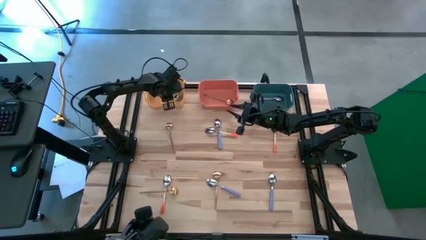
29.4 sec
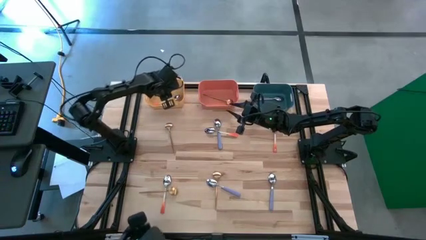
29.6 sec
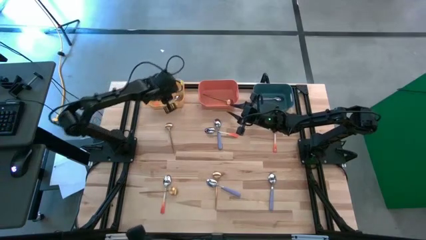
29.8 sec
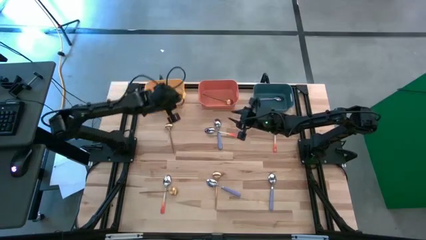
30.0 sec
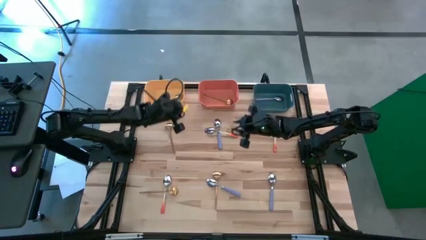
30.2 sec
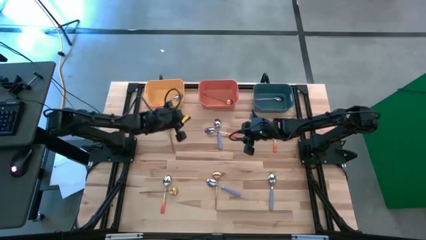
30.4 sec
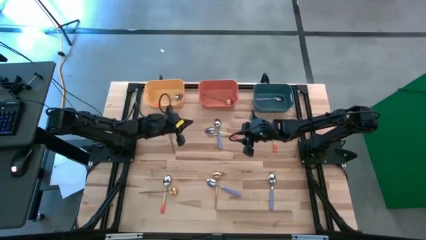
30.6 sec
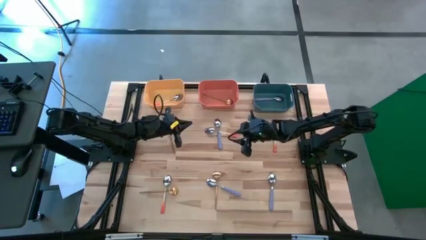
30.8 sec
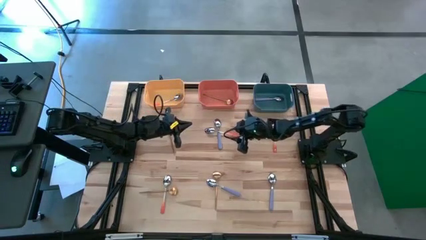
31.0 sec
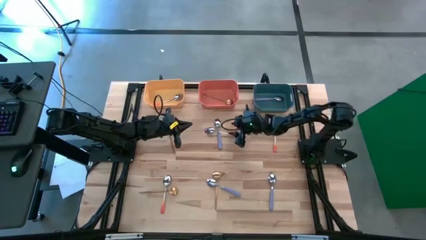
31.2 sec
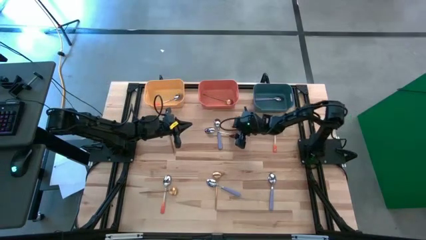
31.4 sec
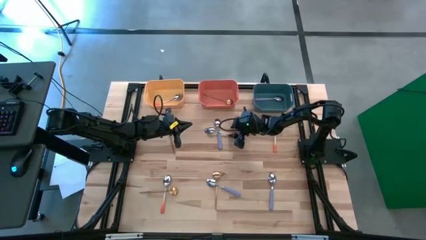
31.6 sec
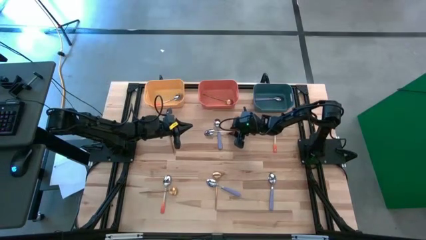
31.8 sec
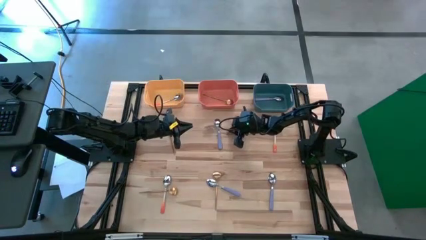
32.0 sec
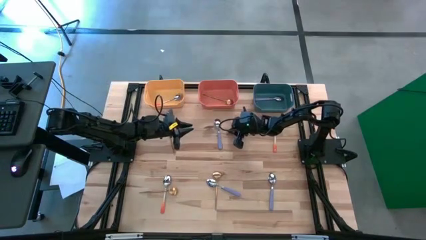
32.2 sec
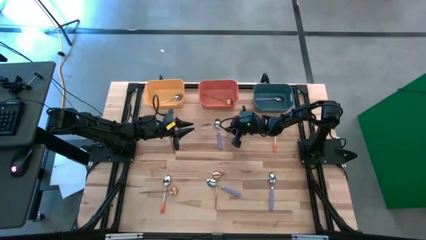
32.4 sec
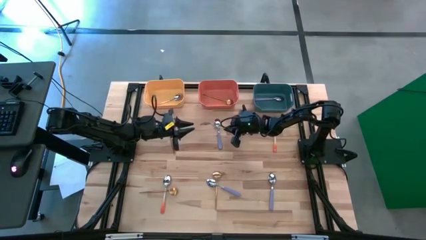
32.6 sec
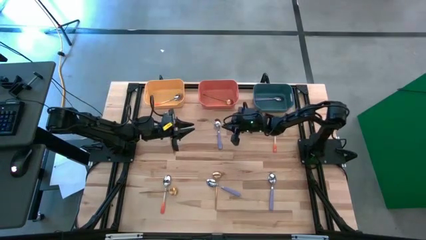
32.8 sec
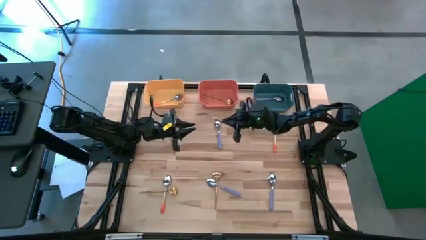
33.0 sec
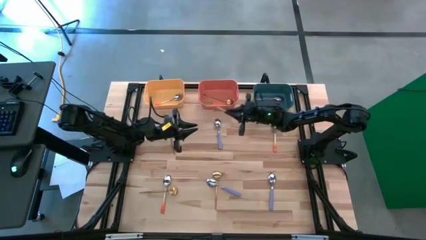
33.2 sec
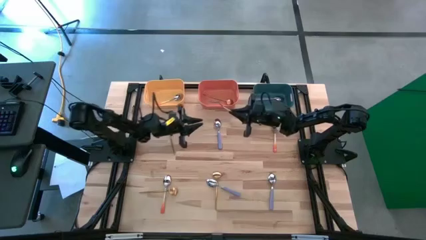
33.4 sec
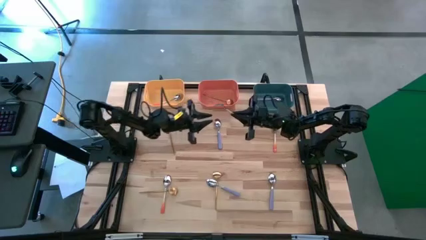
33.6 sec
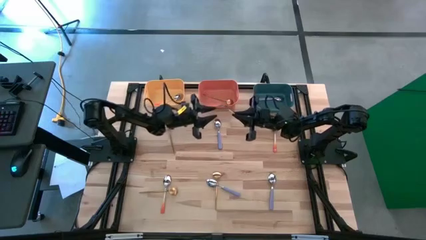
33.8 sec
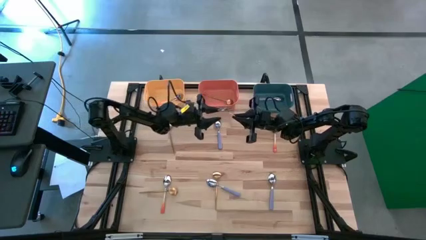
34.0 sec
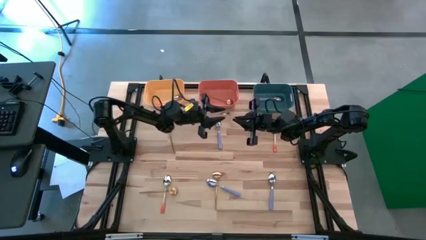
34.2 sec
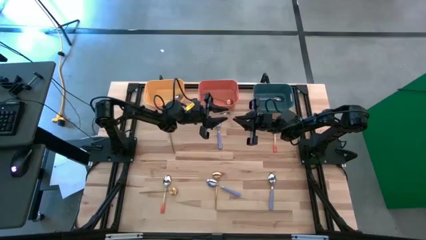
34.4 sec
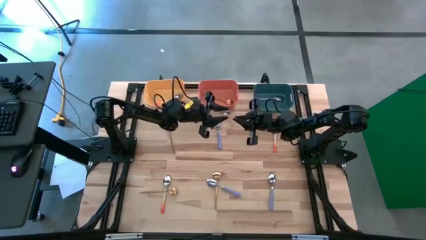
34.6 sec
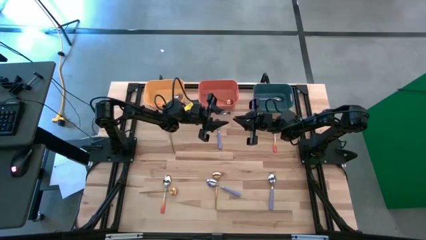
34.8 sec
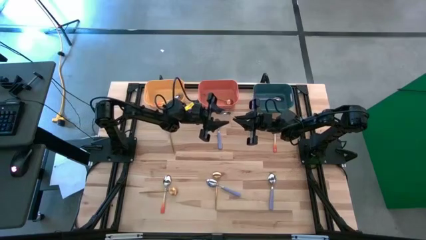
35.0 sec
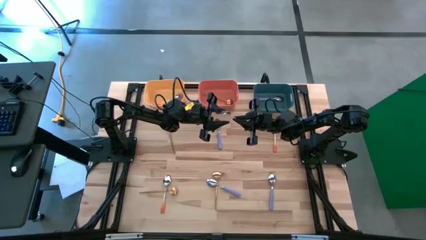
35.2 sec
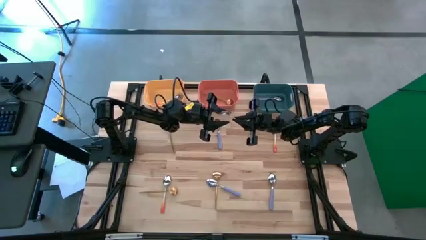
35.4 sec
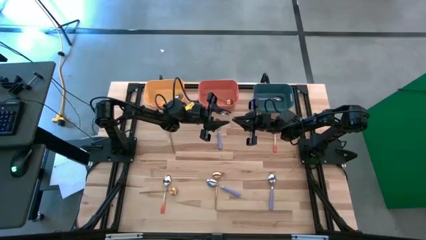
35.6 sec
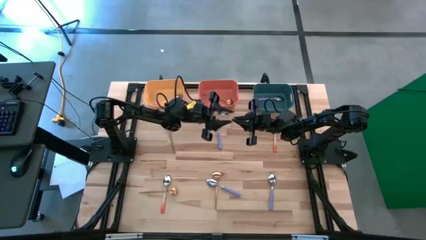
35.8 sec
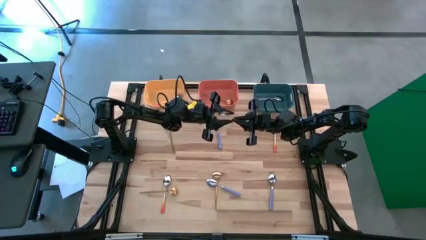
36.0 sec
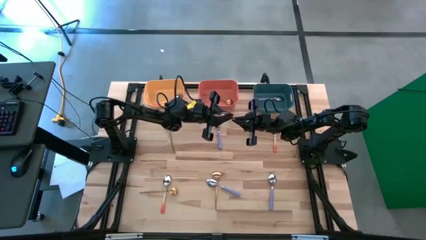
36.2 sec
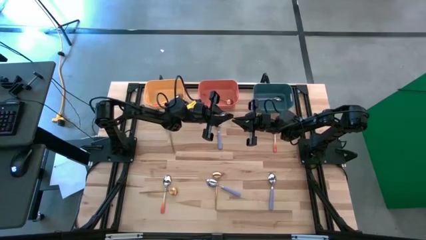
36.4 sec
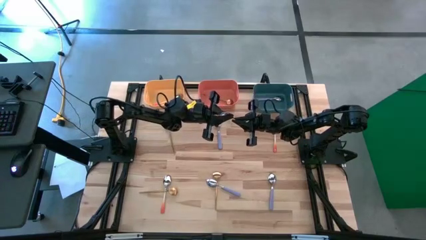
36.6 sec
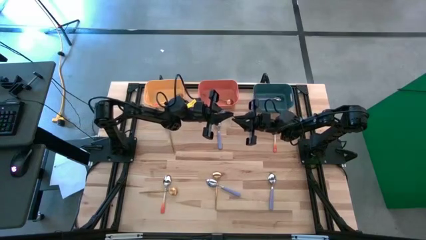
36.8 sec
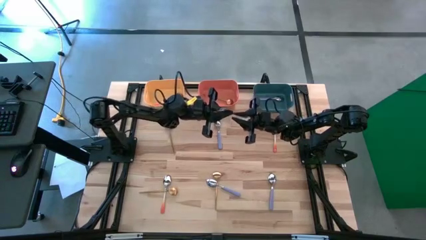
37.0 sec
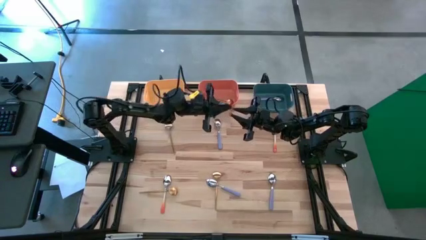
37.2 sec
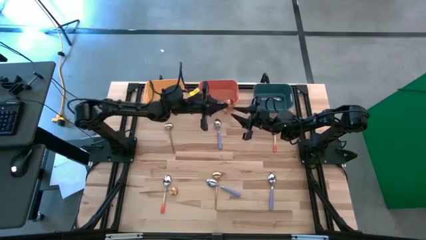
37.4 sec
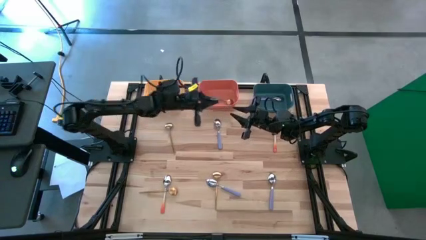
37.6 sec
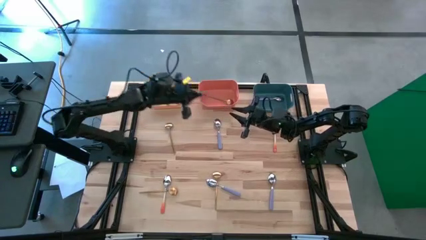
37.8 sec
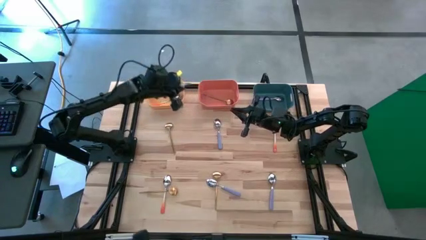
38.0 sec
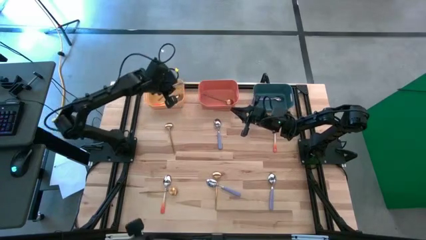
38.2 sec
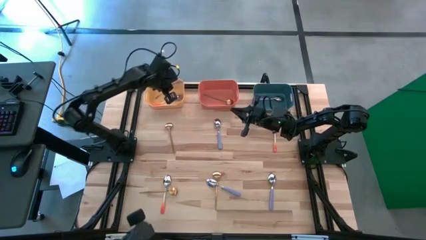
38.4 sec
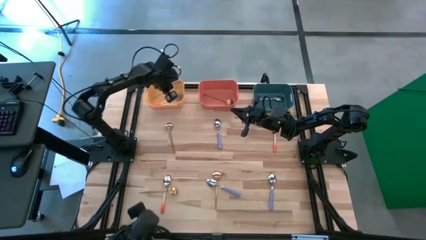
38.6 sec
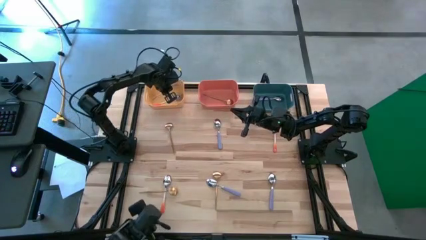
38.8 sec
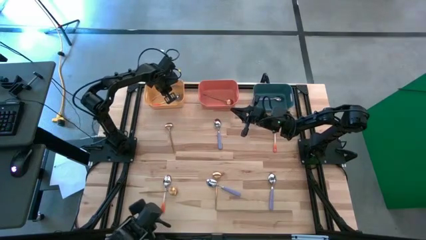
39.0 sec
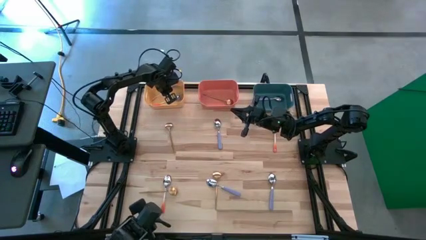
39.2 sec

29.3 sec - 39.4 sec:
Task: Sort silverware by color (type)
Put the orange spoon into the yellow bin

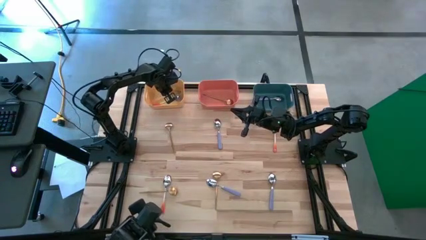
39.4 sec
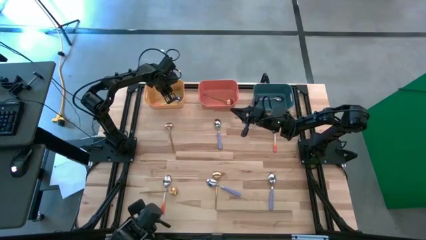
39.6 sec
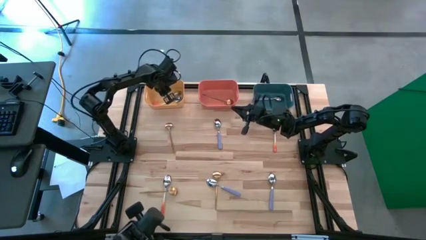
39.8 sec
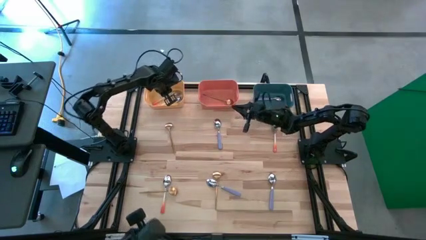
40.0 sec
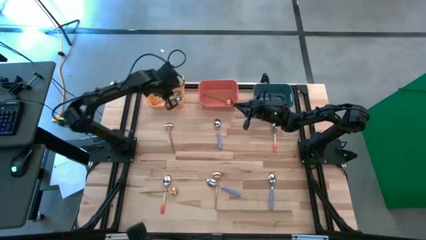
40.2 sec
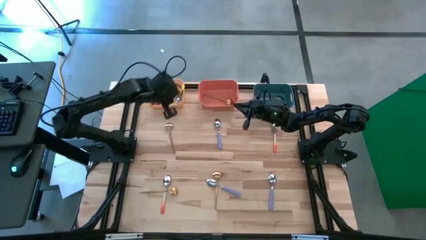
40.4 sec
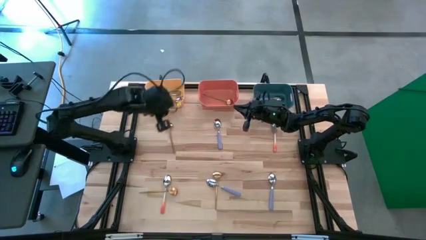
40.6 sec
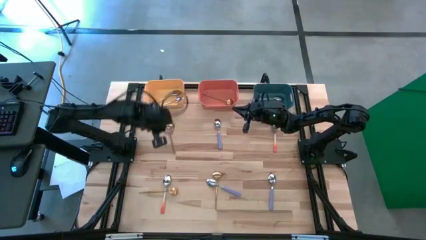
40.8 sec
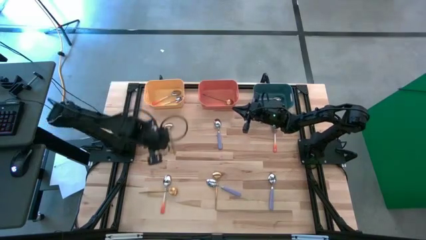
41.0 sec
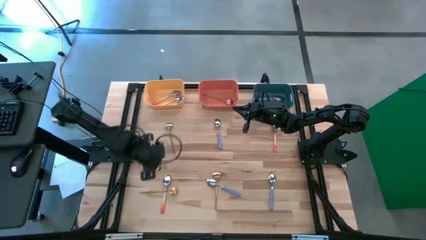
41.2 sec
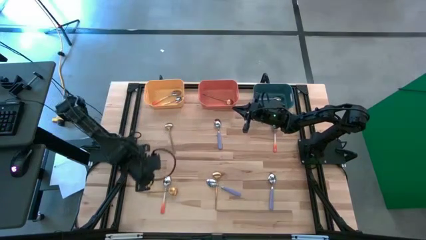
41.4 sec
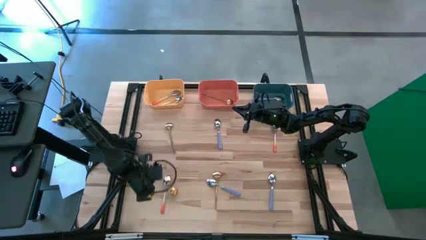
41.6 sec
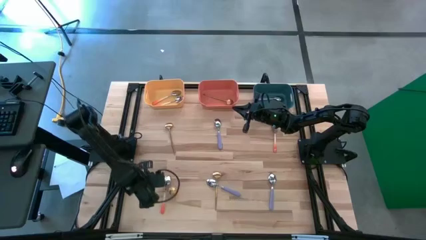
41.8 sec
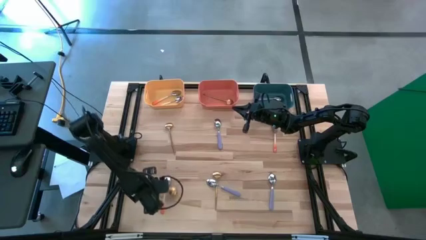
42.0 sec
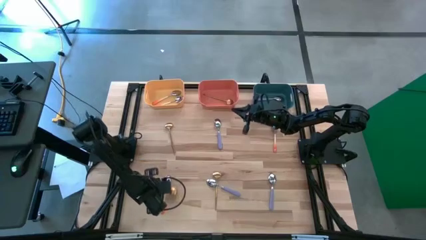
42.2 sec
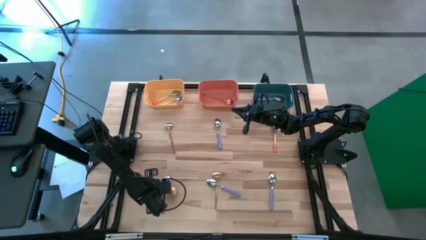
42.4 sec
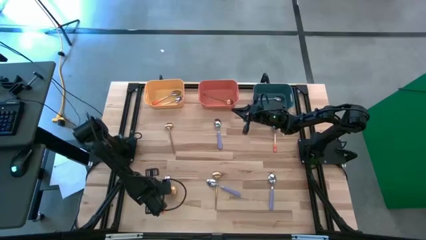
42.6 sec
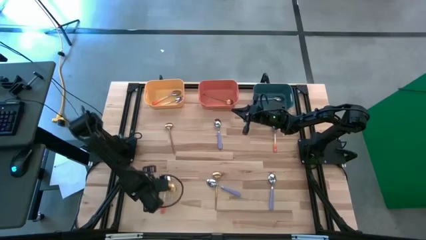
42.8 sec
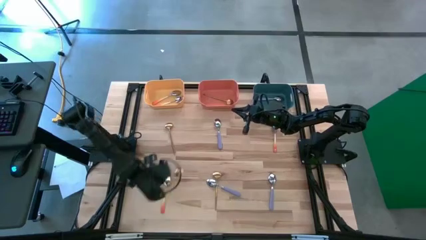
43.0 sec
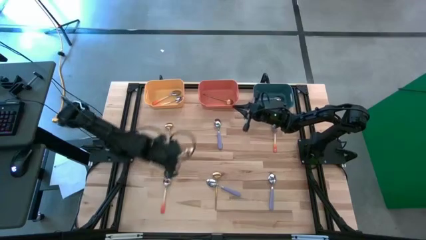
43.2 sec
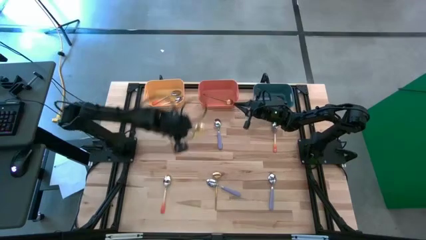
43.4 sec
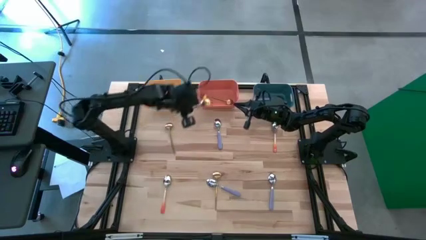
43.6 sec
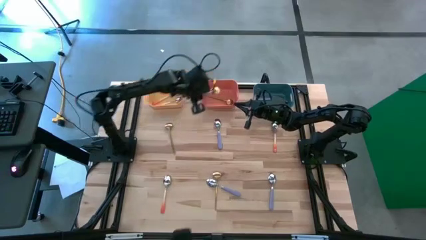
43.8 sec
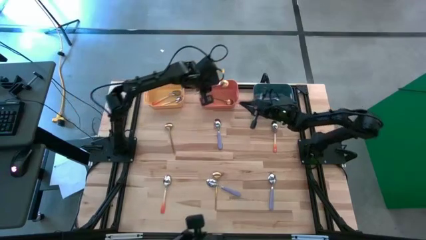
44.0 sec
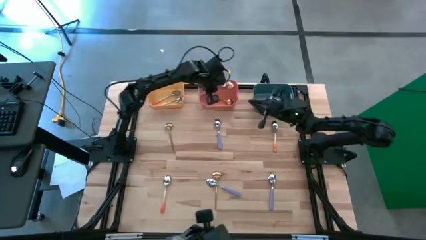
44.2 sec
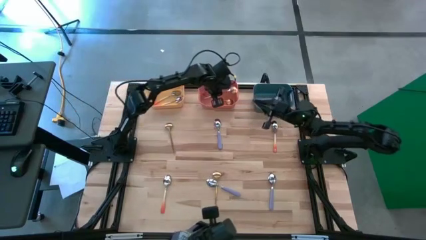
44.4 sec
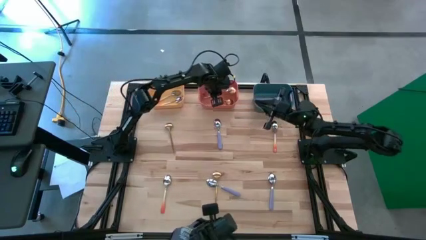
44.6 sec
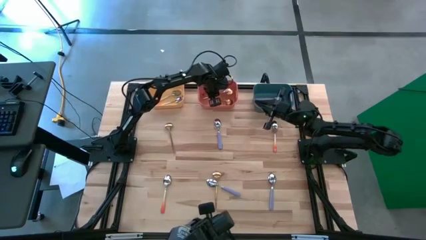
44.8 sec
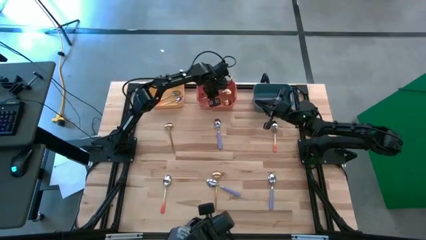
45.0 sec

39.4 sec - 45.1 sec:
Put the gold spoon into the orange bin

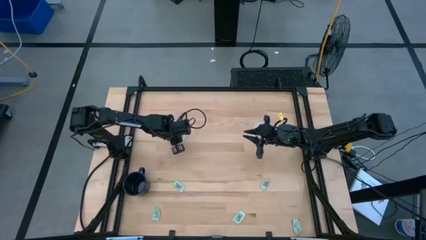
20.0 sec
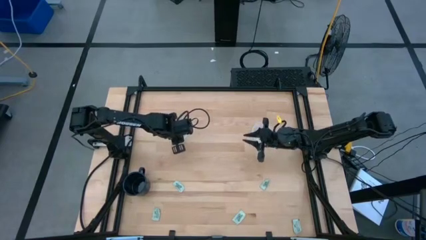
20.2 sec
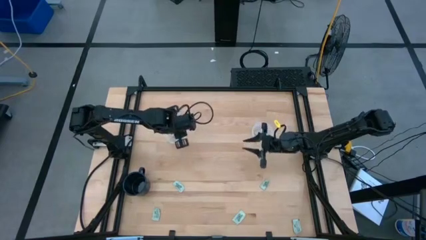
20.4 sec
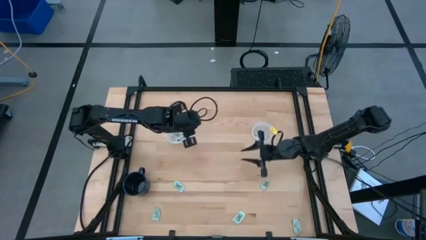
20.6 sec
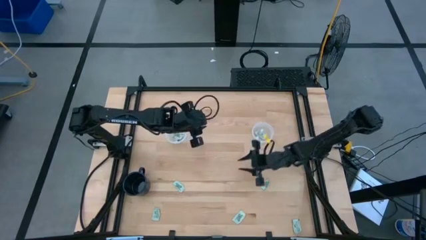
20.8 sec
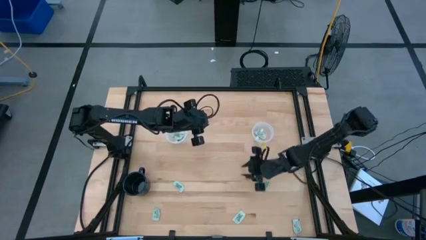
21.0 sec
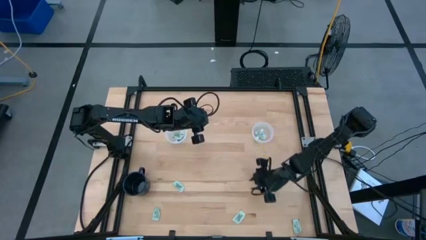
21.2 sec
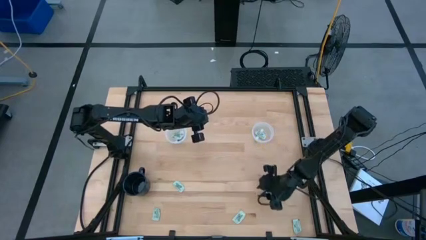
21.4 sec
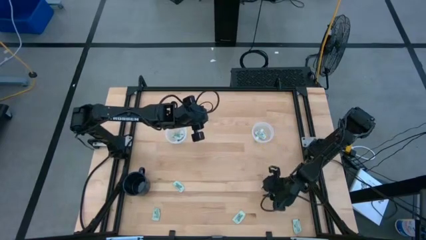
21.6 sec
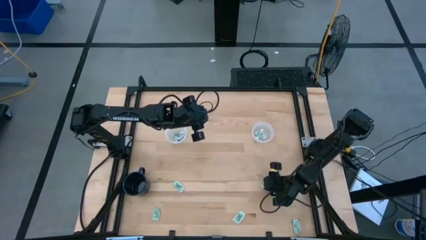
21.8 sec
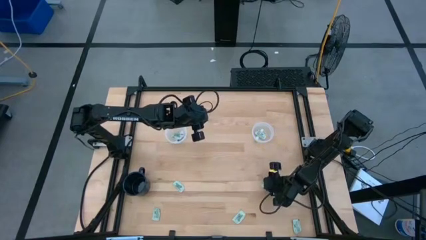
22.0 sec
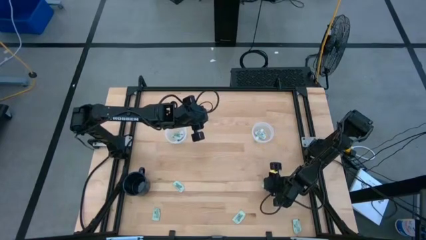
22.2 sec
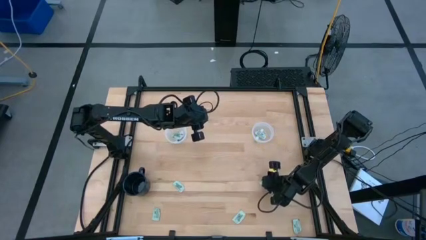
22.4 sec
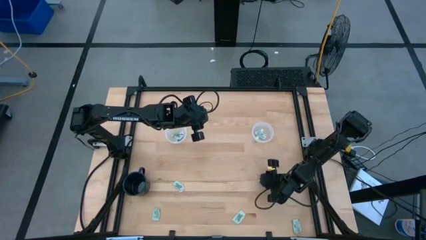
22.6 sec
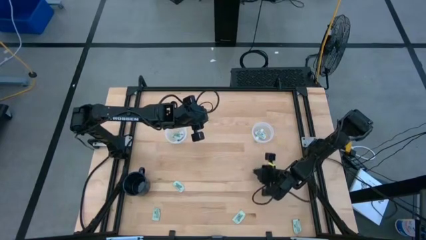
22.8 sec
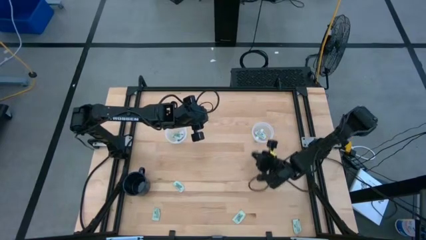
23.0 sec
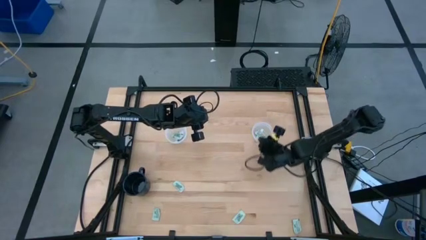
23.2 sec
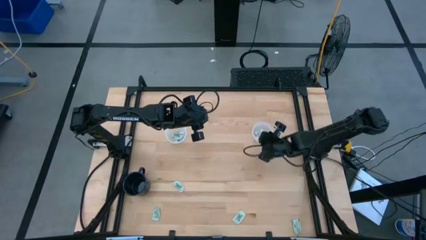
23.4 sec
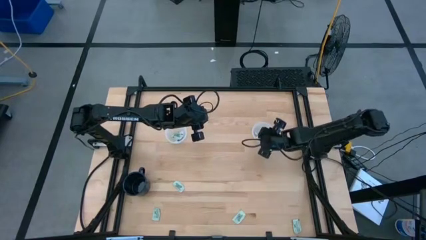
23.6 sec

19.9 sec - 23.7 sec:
Task: Pick and place Stevia / Truvia into bins
Put the stevia packet into the right transparent container
